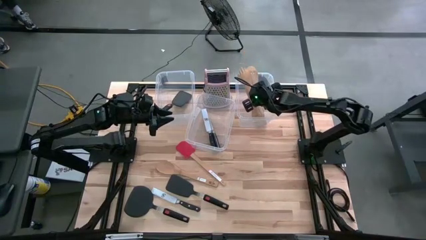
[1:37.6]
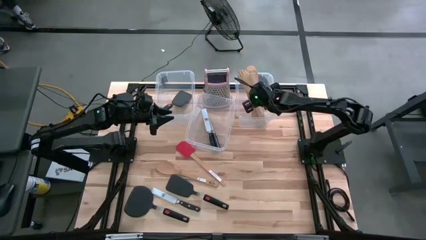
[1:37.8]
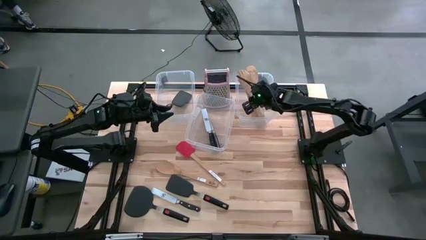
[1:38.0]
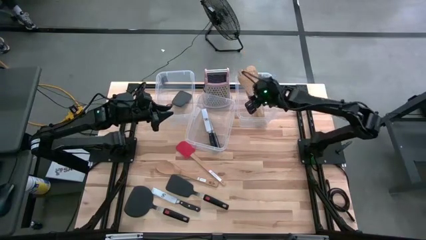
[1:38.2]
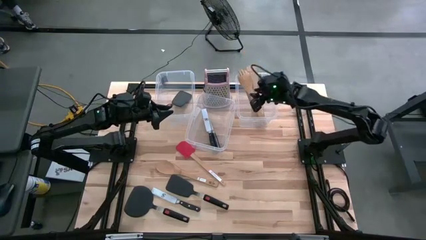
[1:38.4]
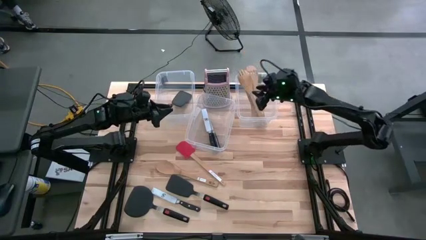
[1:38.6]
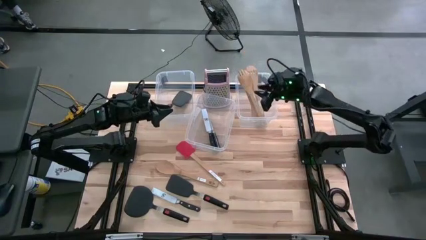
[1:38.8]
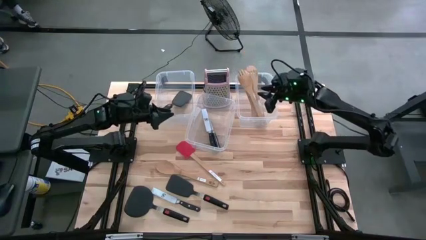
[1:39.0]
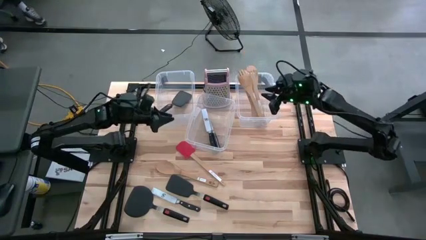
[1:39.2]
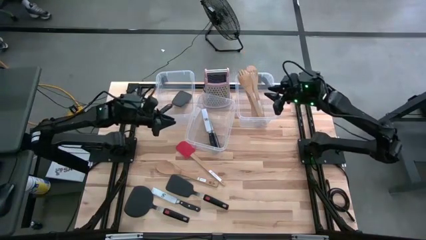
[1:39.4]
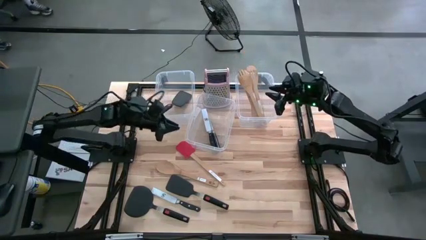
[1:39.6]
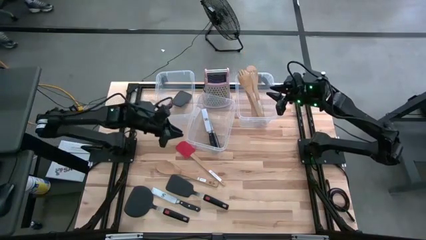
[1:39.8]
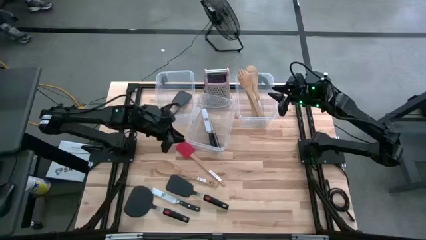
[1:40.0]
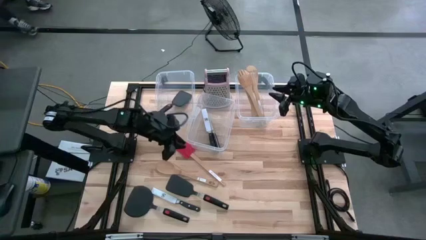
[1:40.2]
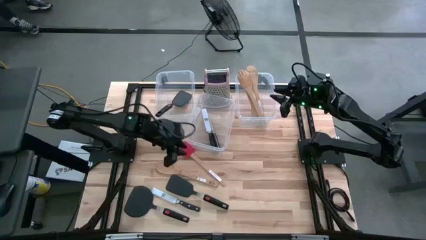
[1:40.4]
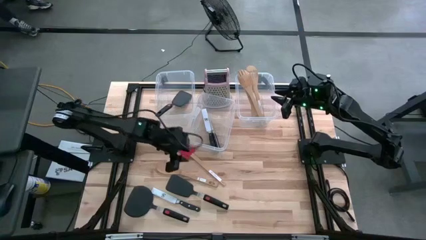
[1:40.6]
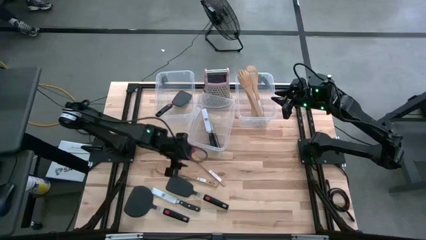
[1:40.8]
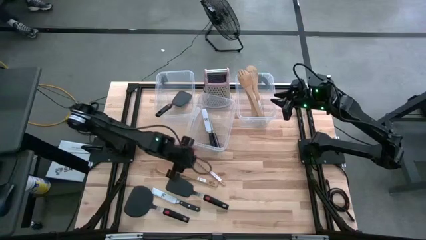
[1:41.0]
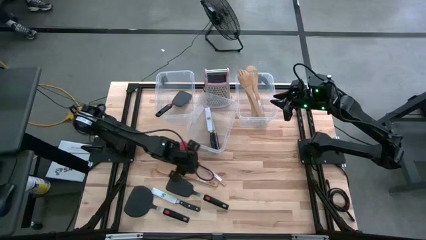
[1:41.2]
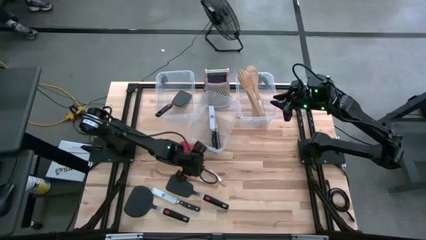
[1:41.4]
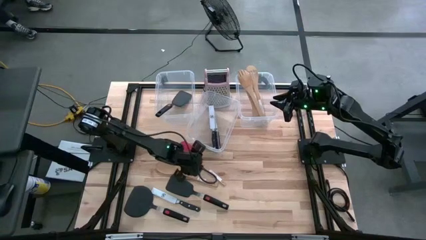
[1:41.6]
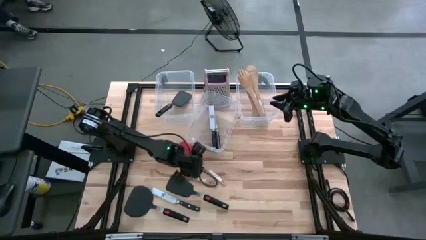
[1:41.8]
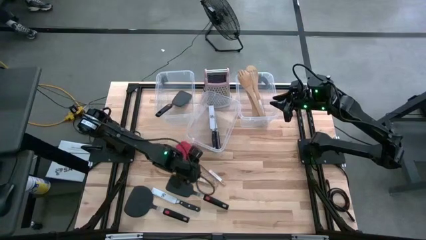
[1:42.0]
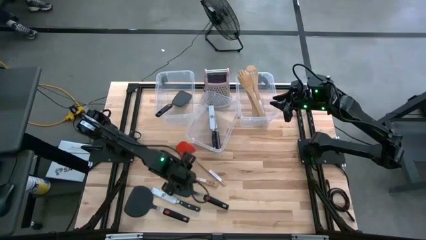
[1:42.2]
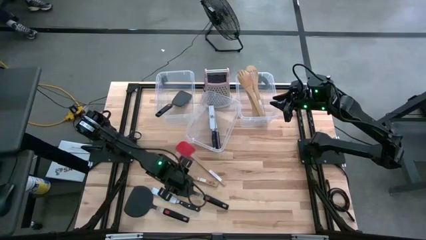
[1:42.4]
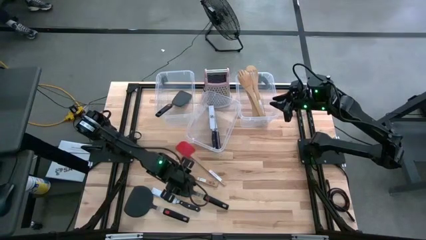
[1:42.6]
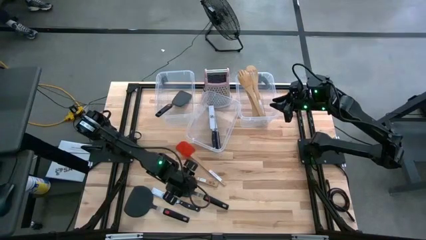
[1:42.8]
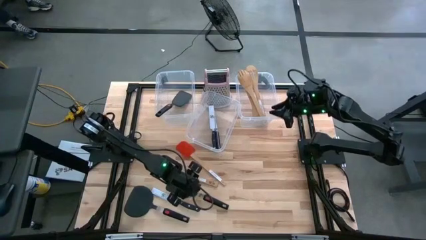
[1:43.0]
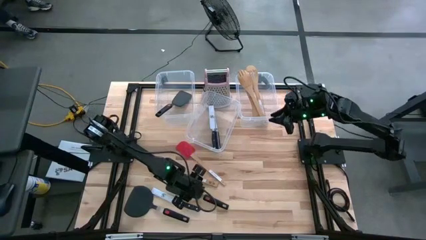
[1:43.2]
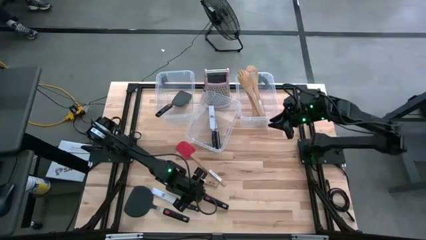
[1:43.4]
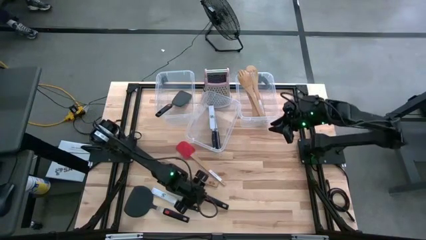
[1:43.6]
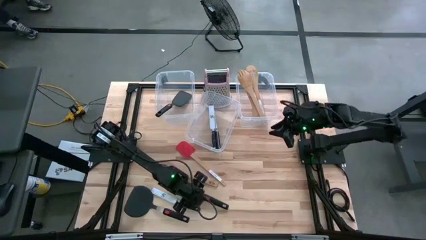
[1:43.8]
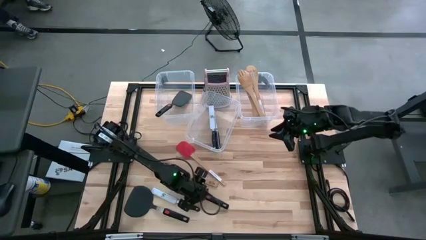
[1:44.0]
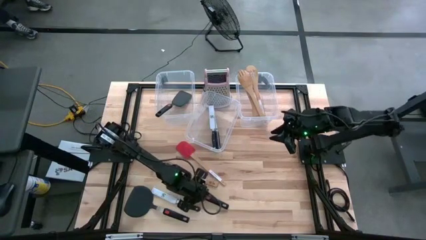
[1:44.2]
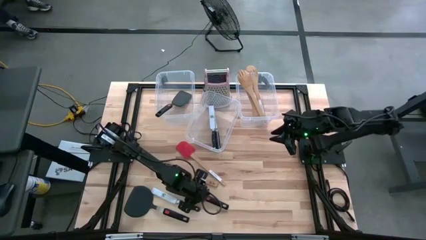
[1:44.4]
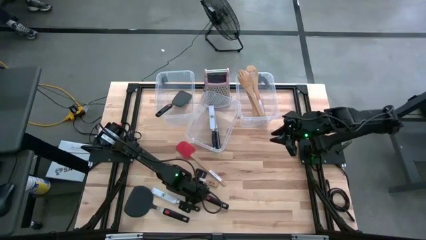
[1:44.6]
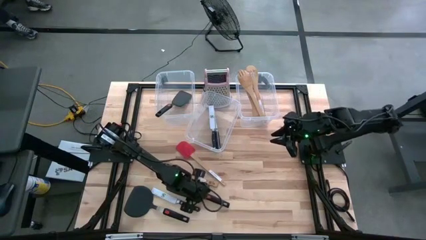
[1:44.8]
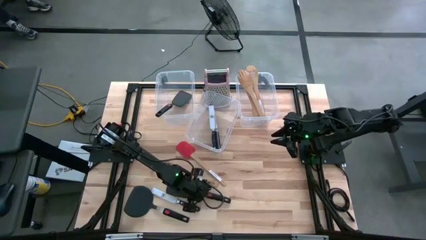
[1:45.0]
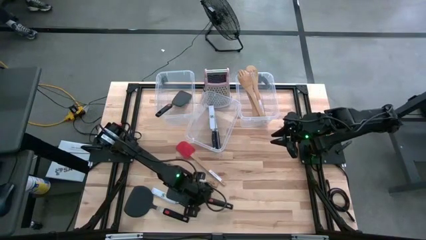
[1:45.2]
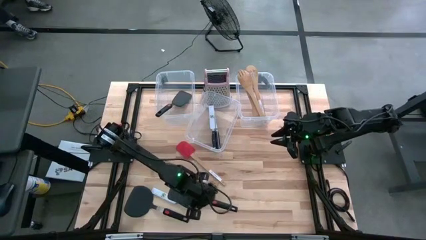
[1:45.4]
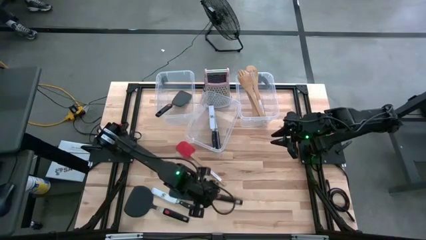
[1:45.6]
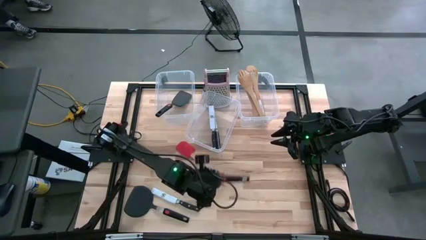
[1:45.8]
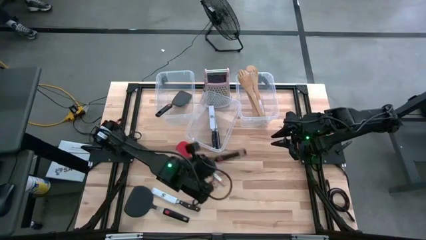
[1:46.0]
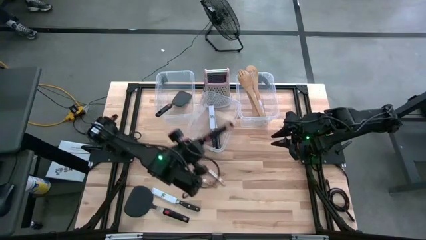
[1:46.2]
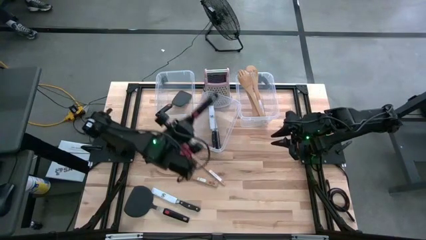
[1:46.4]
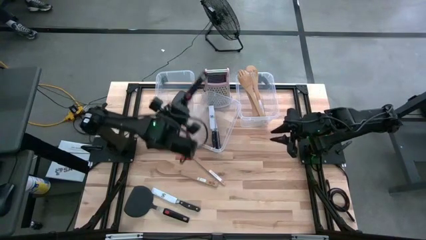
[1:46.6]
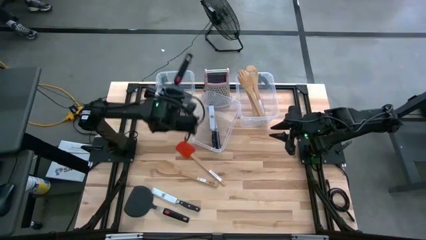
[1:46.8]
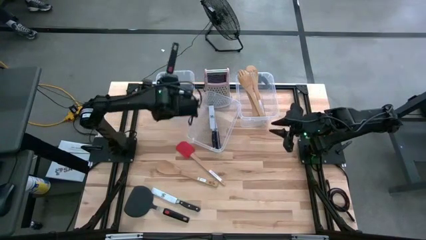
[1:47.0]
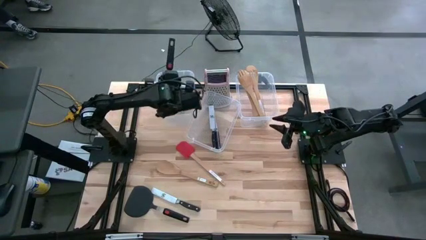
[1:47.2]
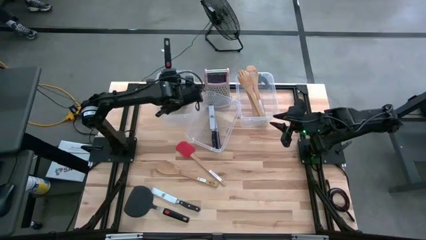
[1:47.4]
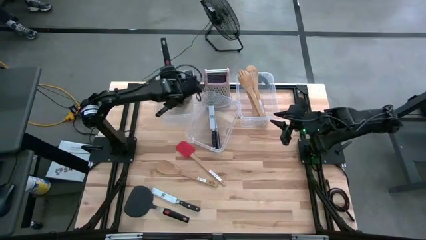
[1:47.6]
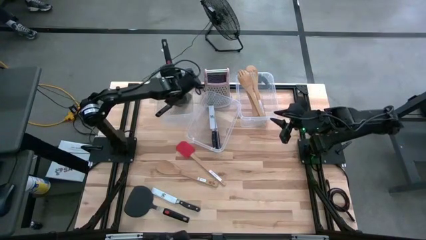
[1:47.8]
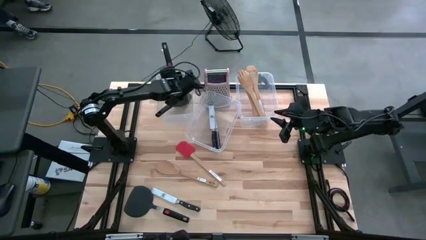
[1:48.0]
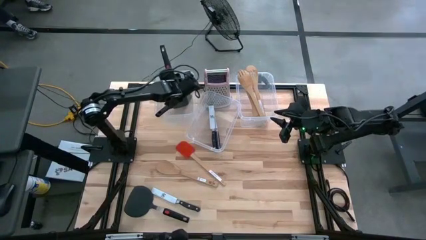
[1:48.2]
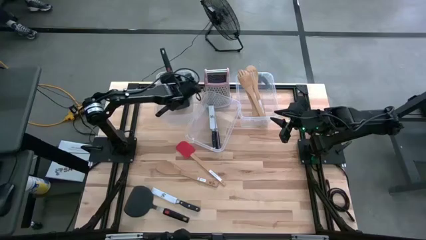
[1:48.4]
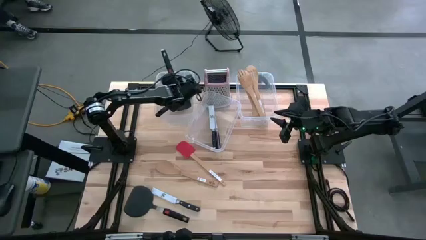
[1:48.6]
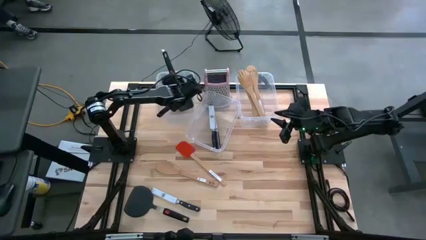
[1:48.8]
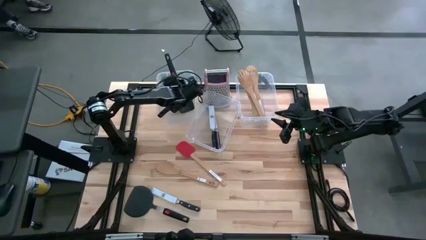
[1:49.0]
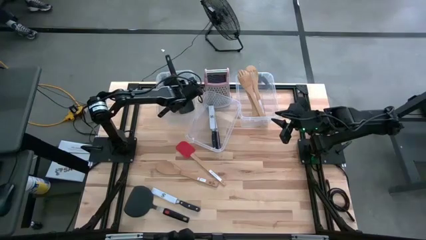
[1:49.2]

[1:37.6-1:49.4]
Task: Pick & Place Kitchen Items
Put the black spatula into the left transparent bin

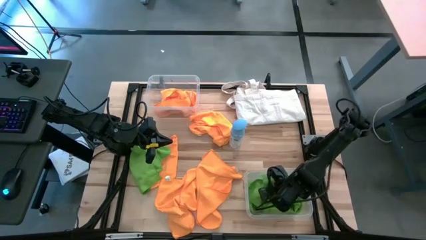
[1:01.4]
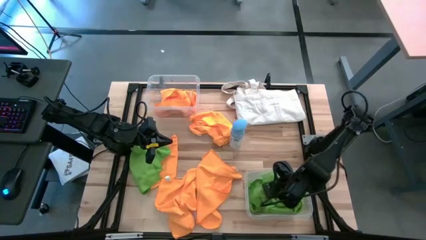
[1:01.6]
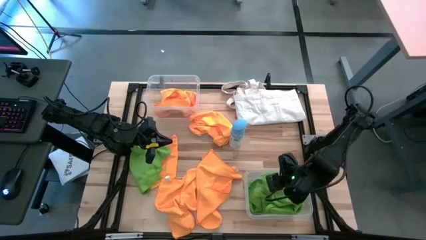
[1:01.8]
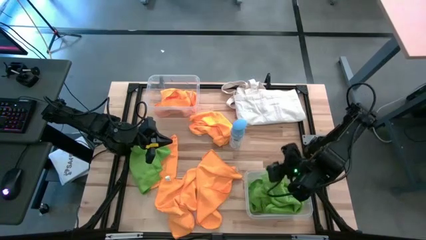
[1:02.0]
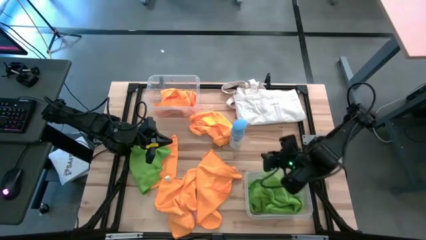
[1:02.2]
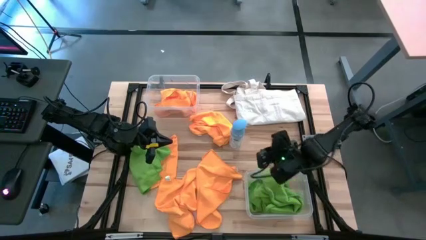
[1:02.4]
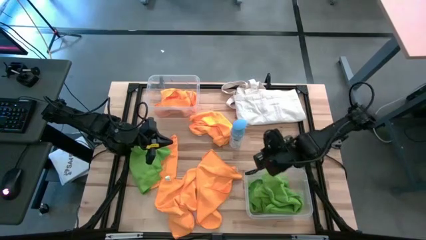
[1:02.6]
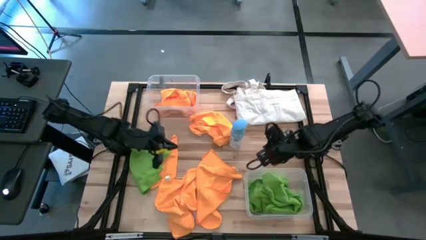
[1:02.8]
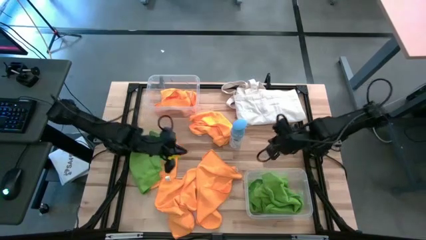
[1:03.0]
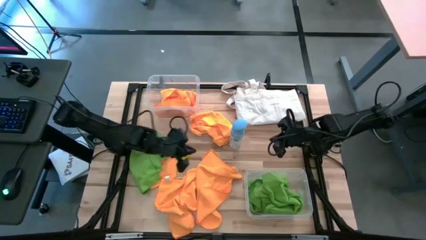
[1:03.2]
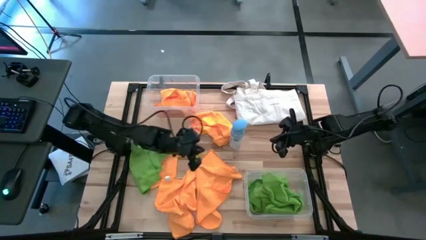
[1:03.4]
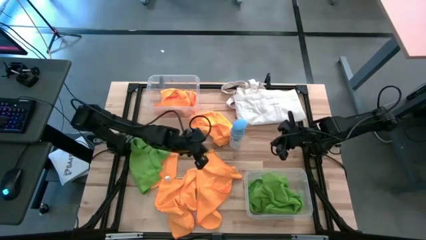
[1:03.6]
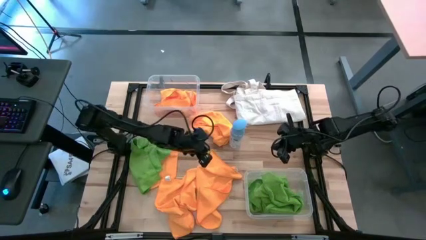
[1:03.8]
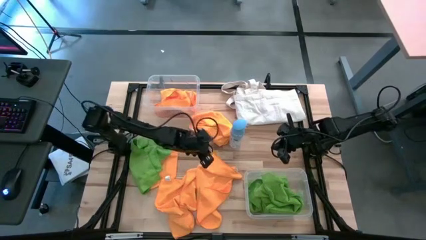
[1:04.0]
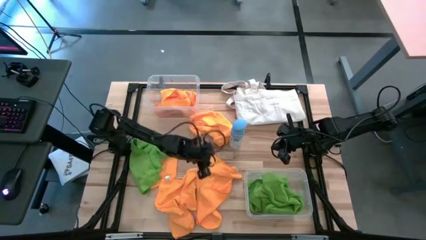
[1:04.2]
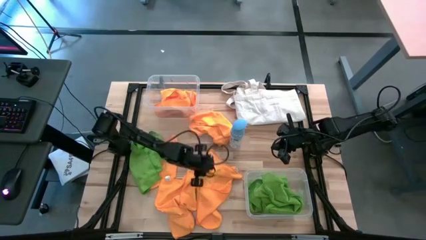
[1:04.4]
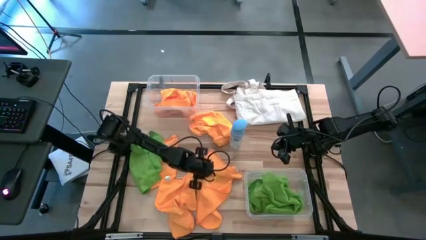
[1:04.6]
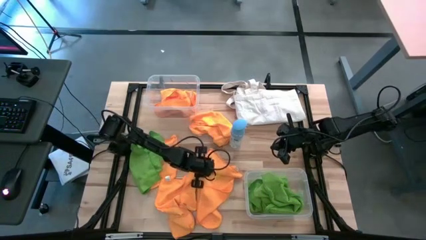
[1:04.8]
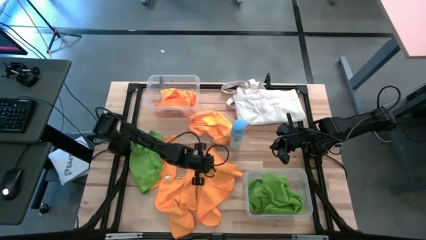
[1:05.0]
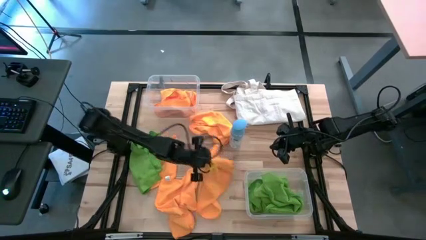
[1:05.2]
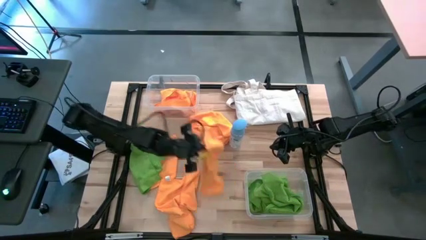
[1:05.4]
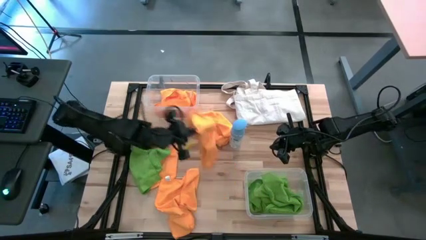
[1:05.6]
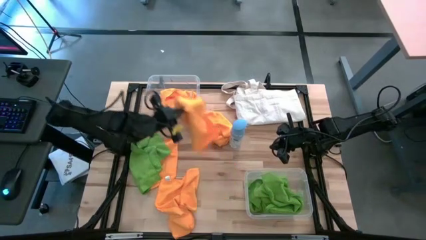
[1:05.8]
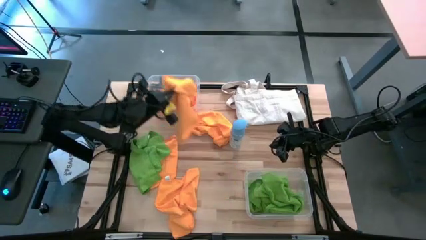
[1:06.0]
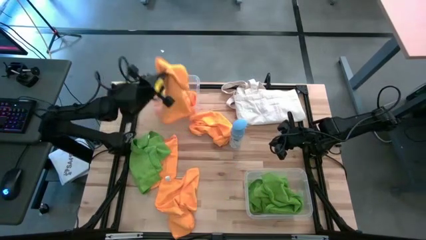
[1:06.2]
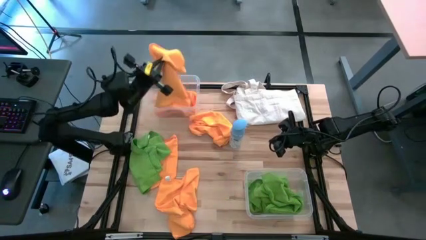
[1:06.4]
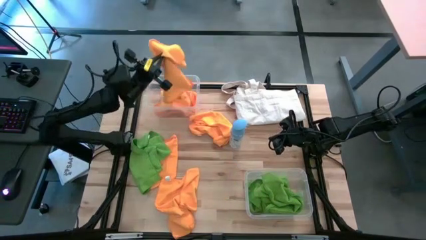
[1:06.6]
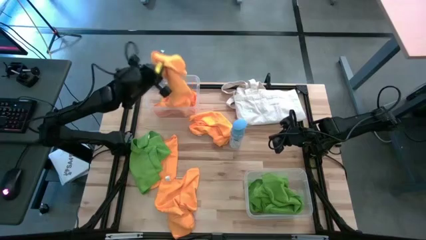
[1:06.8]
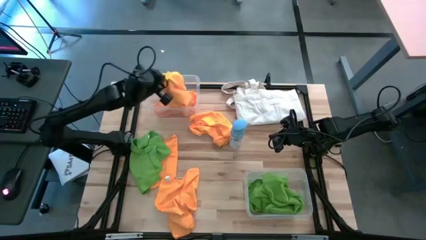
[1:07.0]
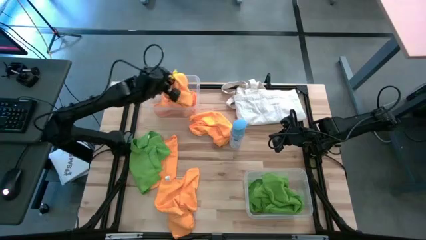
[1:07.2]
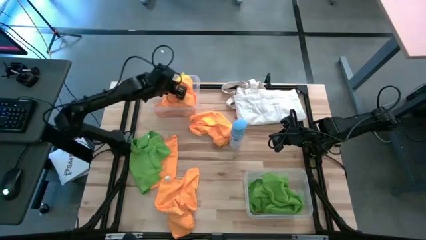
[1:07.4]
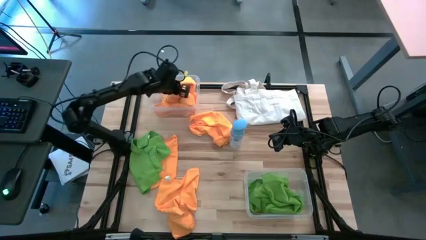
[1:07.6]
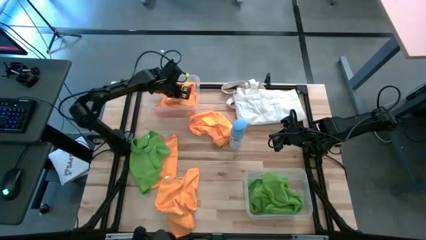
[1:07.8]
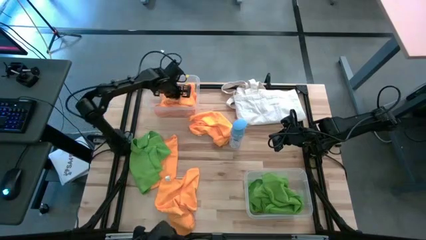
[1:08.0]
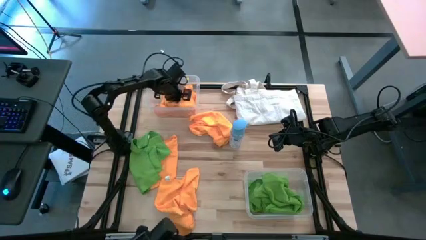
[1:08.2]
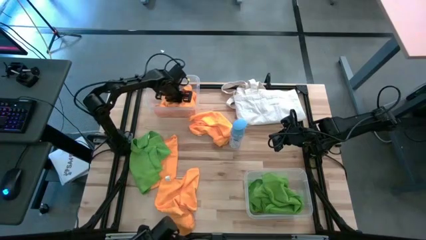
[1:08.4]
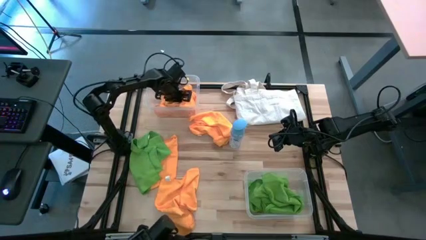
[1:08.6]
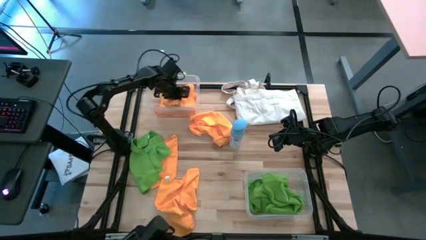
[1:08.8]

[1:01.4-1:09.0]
Task: Sort microfiber towel by color & place in baskets
Put the yellow microfiber towel into the top transparent bin
